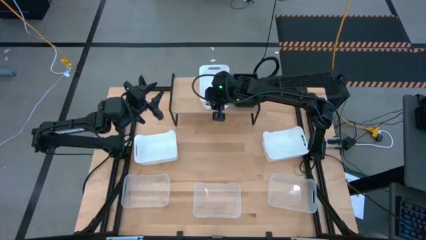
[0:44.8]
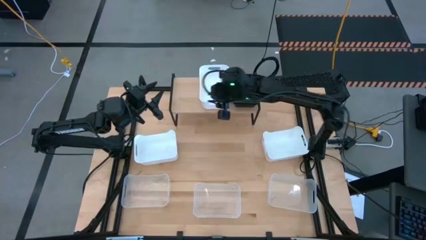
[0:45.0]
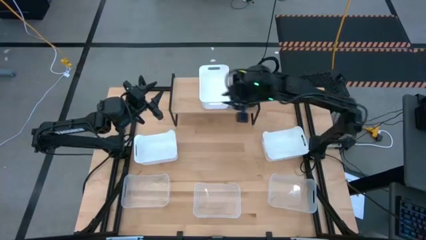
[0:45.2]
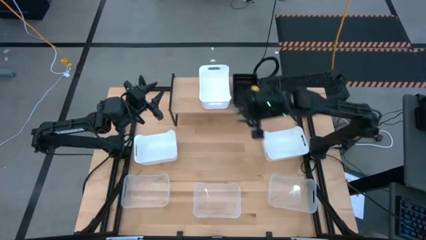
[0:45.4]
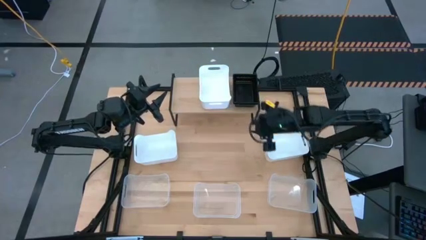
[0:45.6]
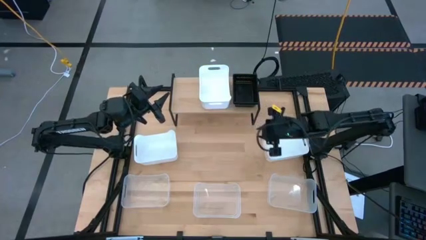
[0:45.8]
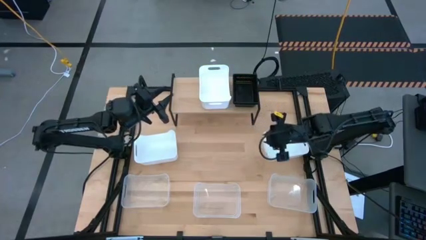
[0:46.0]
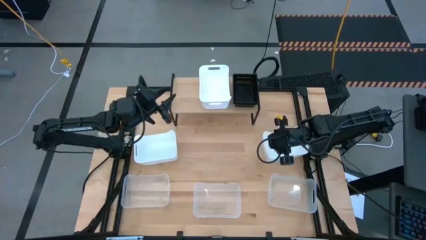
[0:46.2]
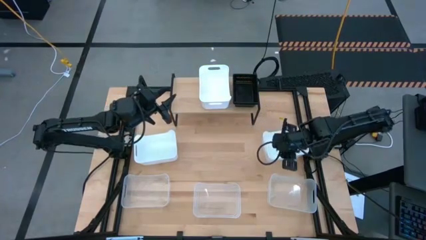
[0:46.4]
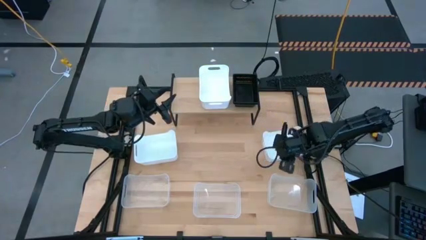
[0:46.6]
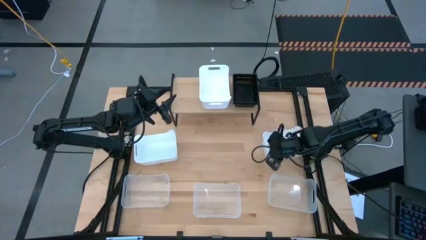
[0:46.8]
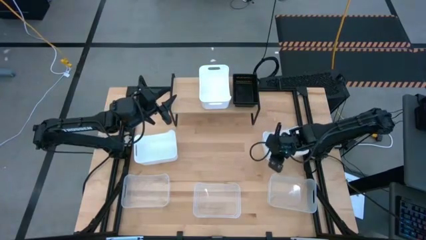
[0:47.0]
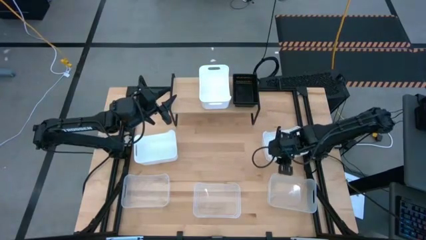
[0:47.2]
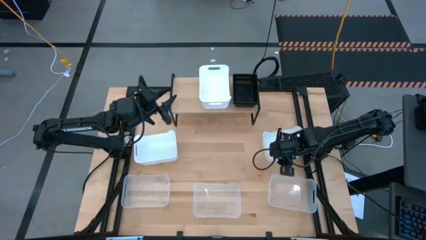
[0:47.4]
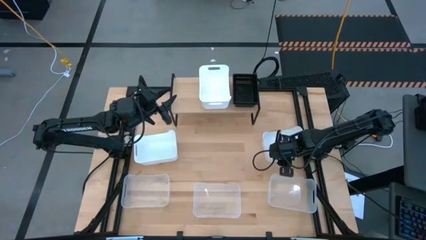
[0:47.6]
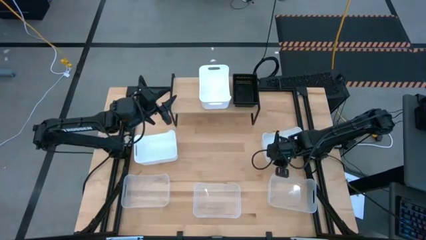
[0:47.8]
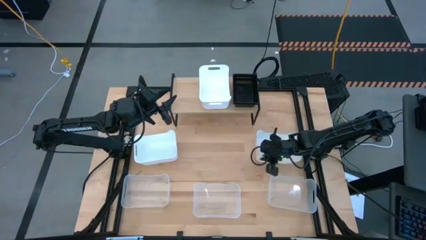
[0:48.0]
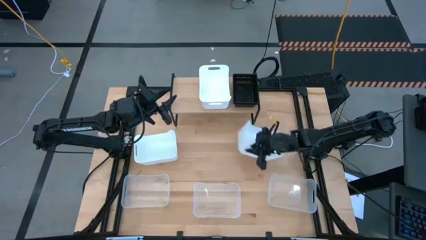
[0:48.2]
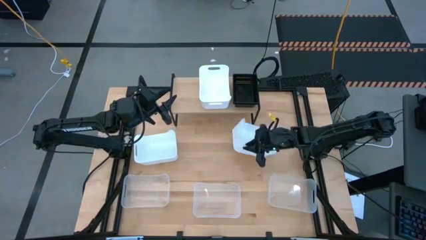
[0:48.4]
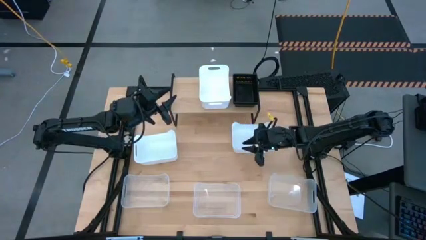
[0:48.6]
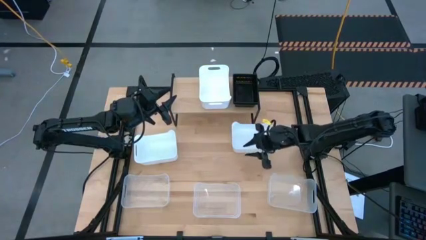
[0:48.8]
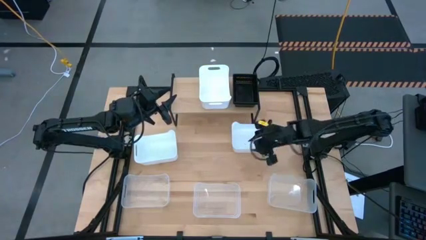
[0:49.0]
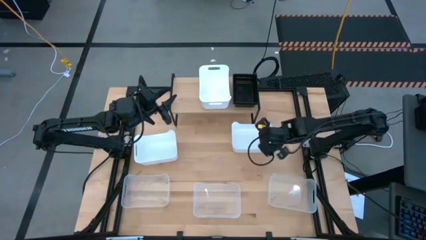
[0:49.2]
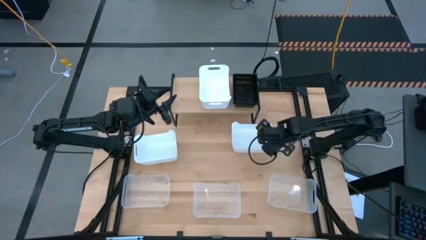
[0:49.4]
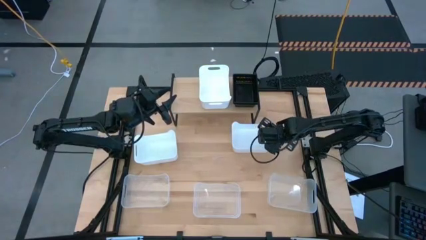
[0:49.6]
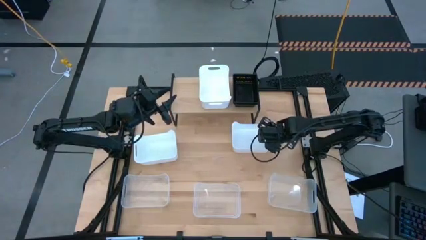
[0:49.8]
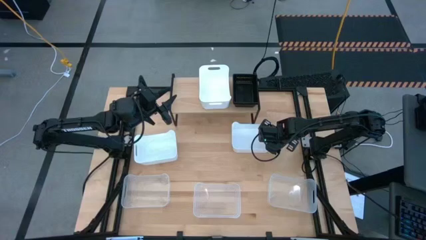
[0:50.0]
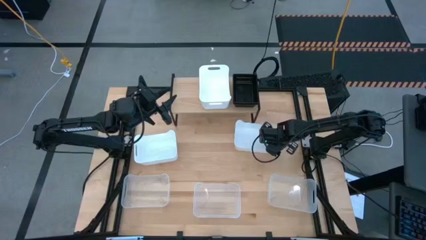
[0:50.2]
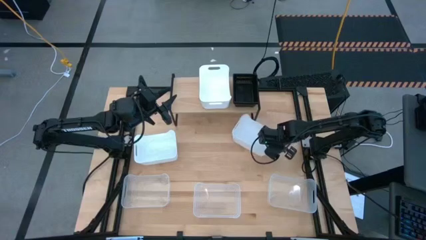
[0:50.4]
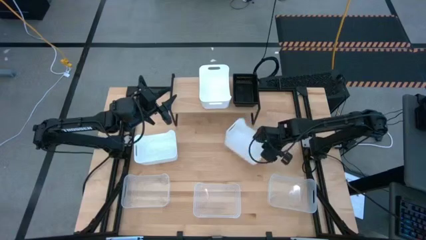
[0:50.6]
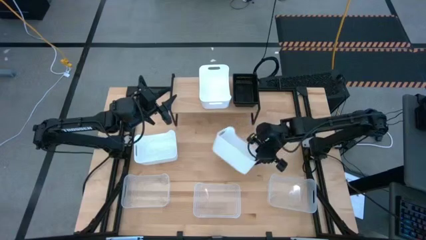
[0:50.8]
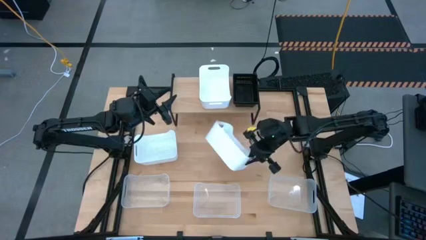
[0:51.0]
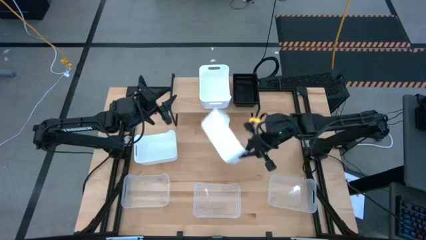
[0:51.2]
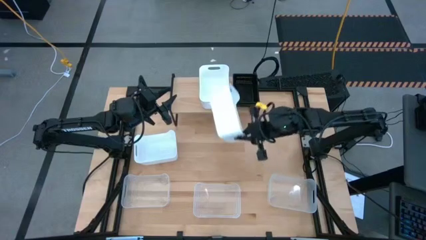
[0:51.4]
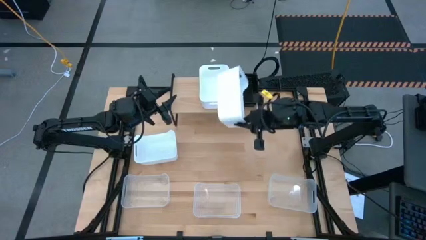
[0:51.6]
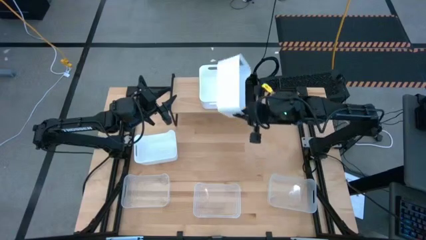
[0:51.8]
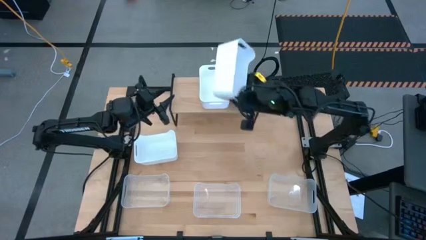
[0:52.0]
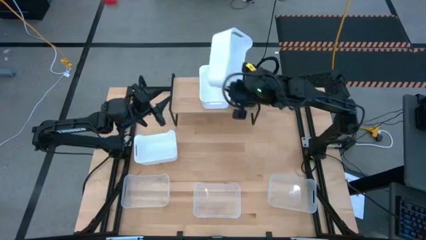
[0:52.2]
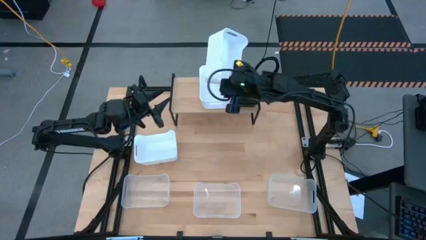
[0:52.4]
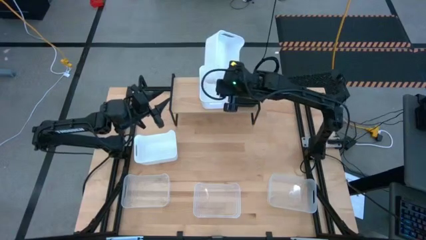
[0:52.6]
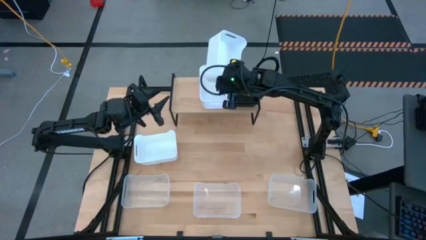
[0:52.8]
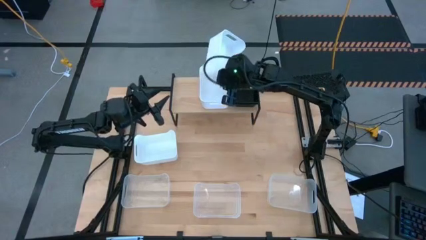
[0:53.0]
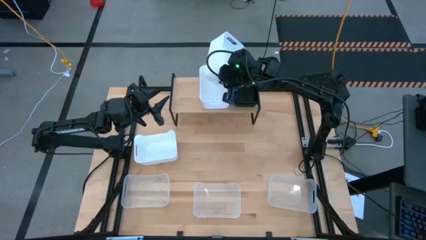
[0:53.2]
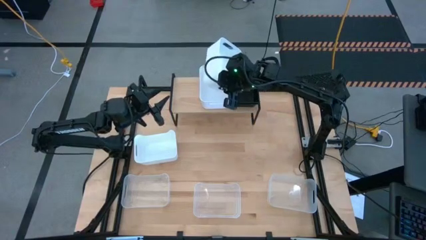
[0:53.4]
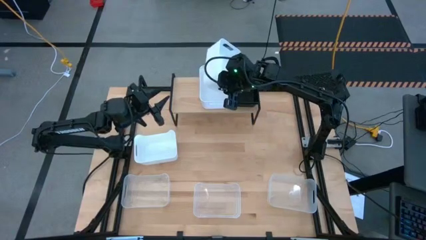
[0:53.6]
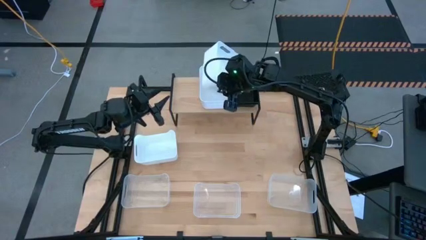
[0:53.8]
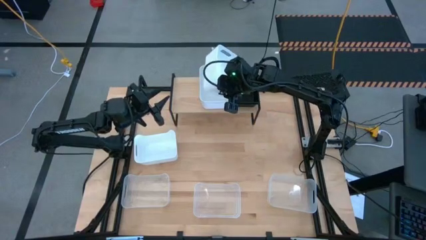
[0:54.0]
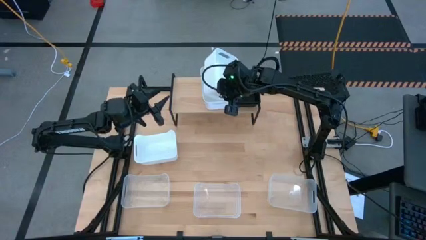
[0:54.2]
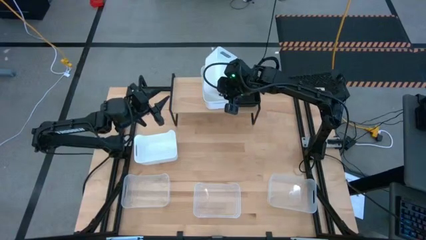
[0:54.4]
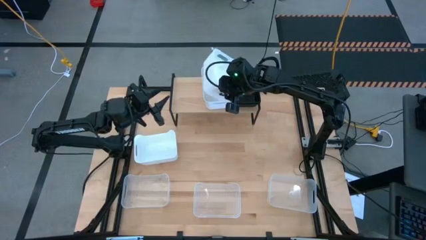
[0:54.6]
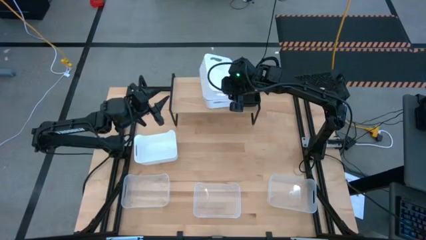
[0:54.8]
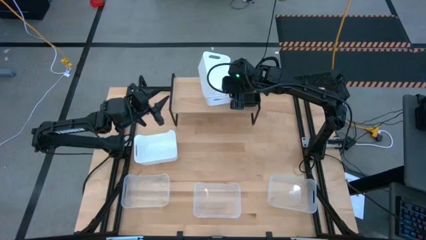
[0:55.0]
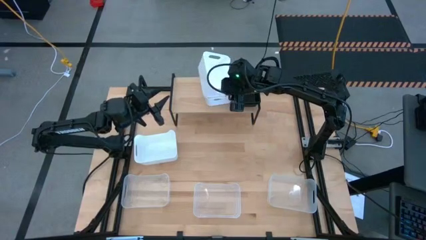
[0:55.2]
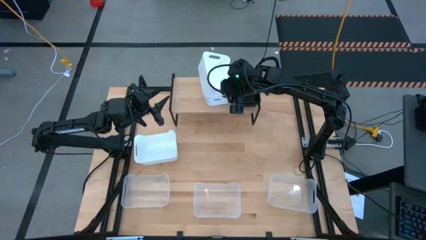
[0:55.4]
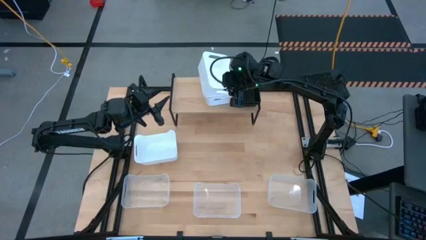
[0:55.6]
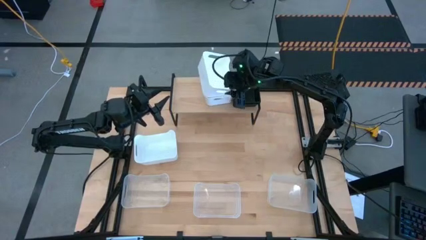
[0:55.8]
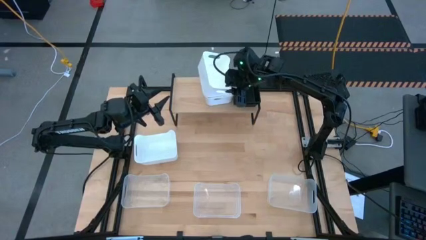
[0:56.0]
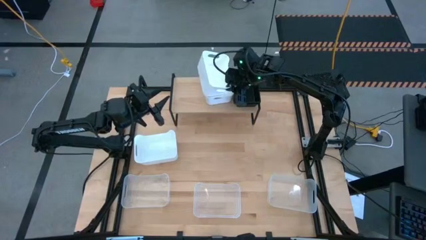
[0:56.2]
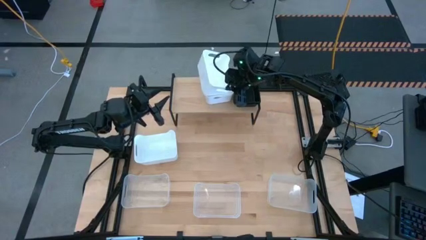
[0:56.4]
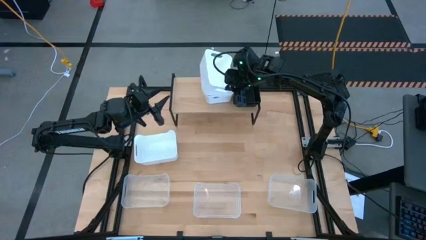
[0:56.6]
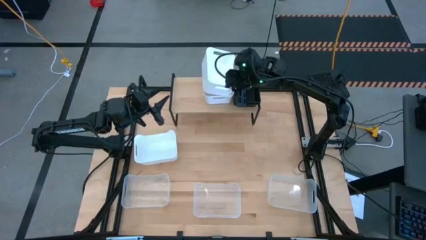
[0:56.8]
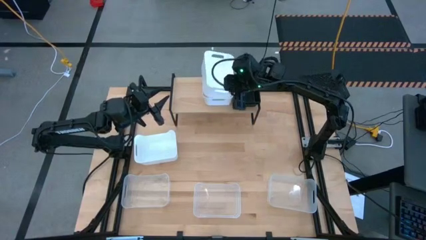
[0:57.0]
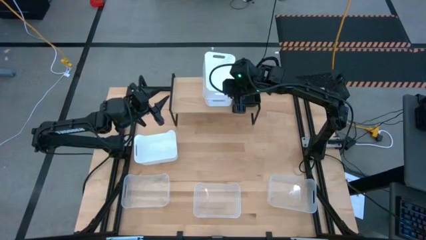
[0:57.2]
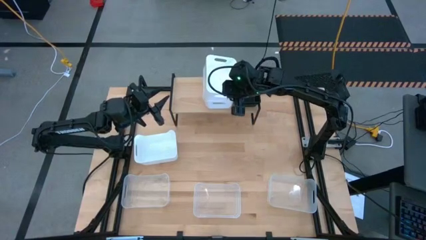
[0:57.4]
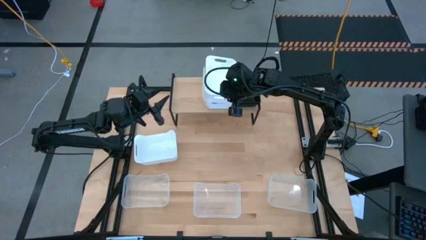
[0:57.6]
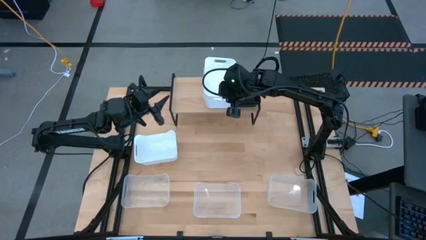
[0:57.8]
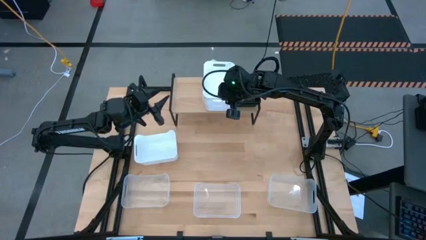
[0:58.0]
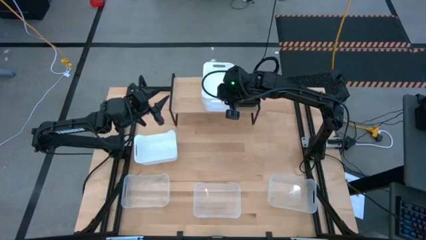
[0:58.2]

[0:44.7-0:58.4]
Task: Stack baskets on shelf by color
Stack the right white bin on top of the white bin on the shelf

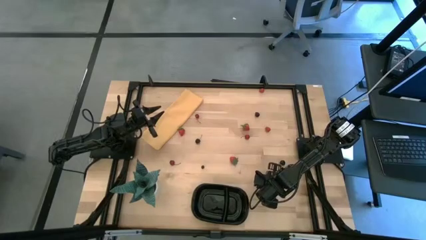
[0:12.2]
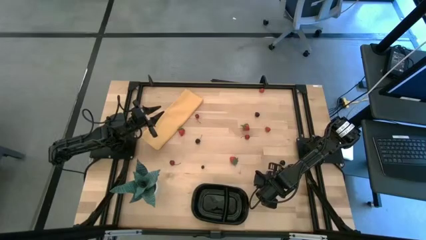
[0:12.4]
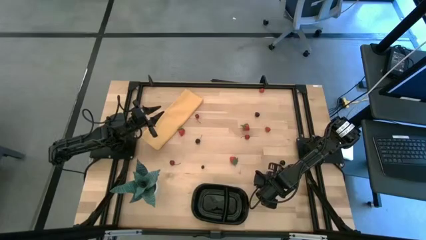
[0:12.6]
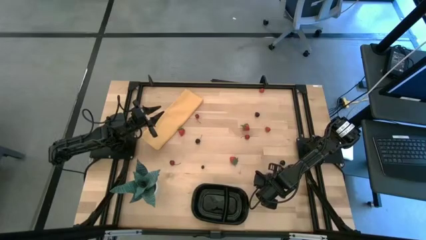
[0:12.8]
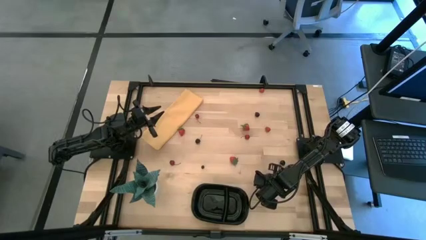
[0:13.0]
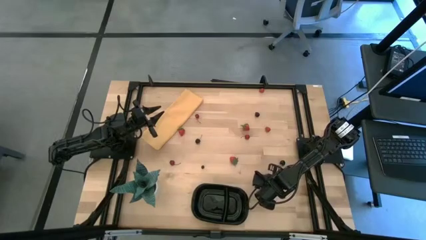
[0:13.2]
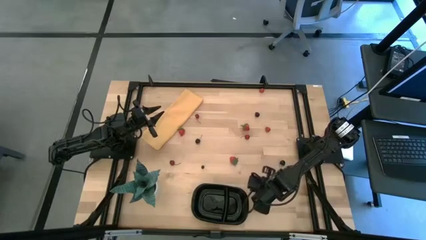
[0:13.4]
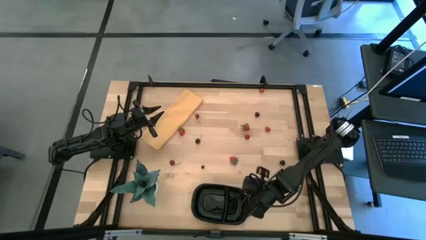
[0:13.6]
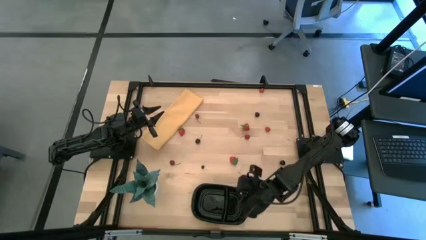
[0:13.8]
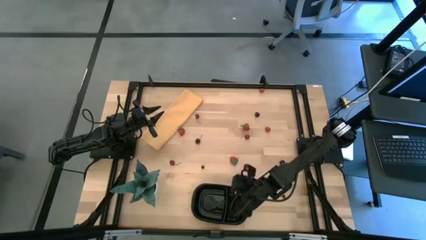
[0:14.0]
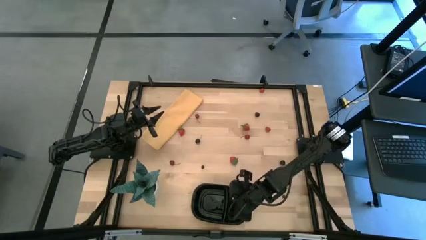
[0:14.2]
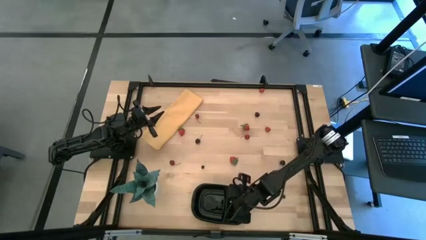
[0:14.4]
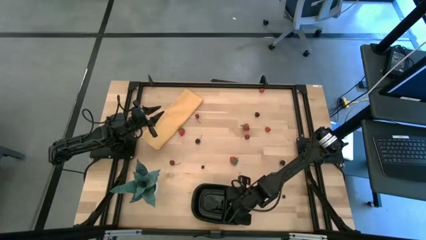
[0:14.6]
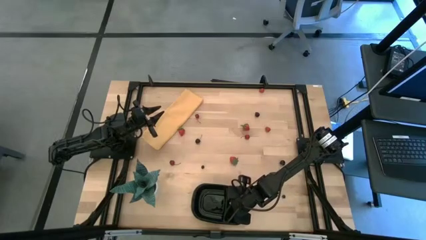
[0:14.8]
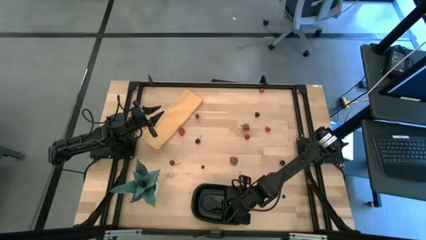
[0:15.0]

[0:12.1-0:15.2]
Task: Pick and placing Produce into tupperware
Put the bottom blackberry into the black container
